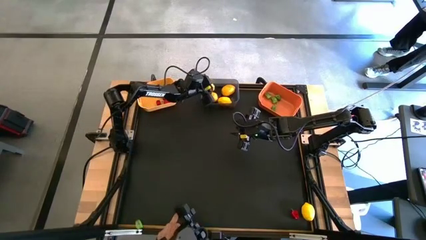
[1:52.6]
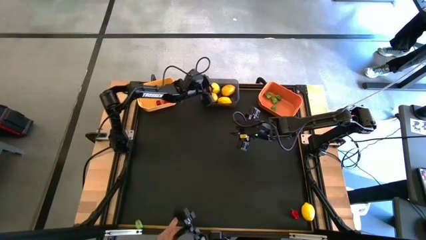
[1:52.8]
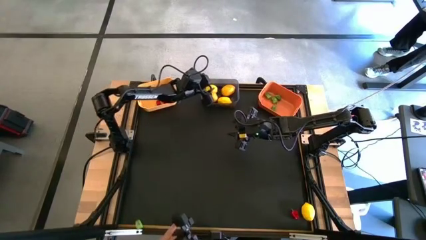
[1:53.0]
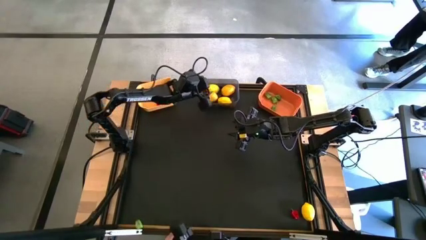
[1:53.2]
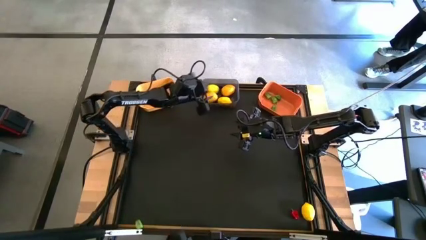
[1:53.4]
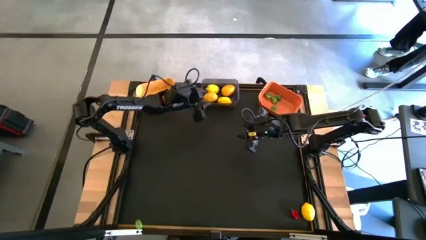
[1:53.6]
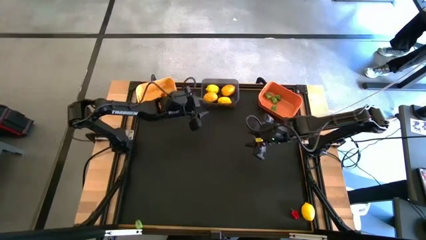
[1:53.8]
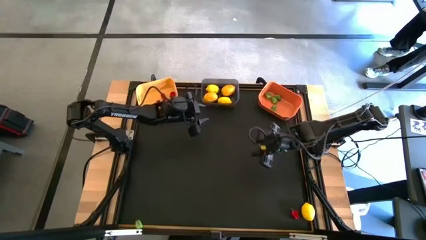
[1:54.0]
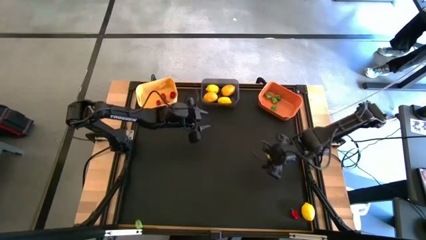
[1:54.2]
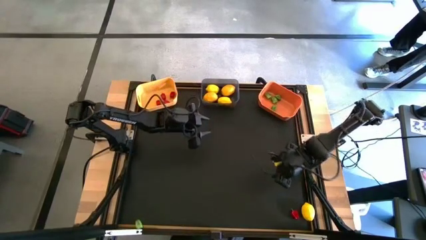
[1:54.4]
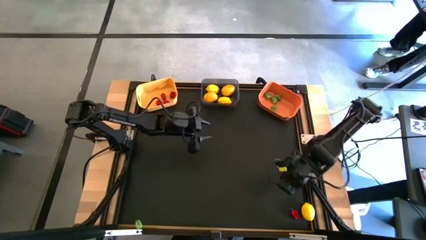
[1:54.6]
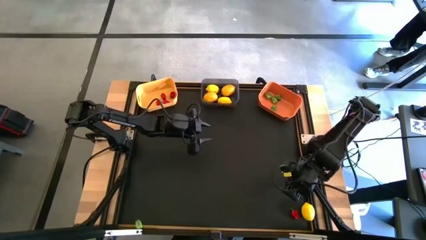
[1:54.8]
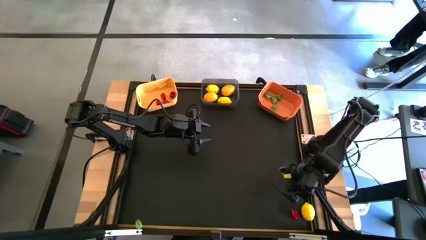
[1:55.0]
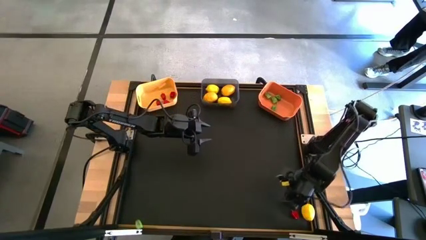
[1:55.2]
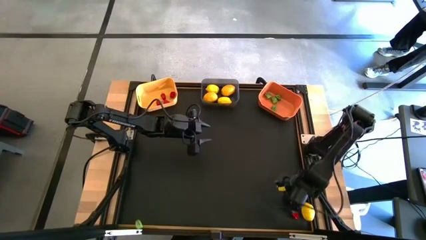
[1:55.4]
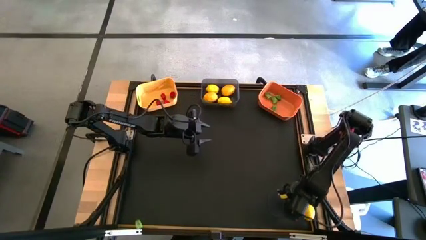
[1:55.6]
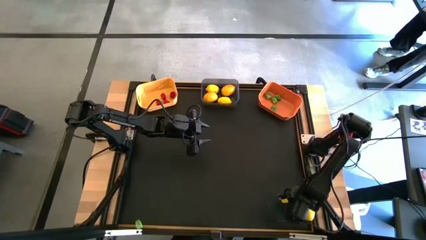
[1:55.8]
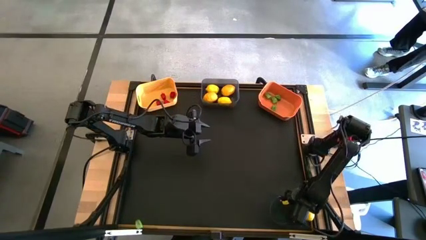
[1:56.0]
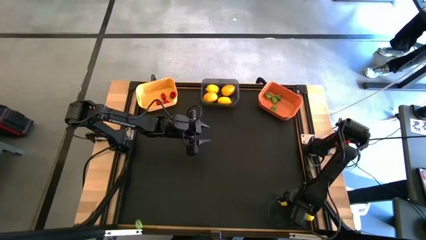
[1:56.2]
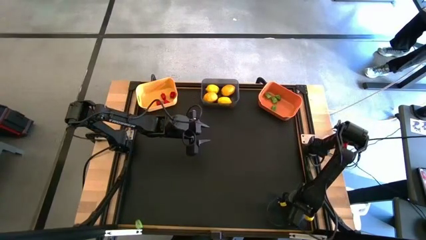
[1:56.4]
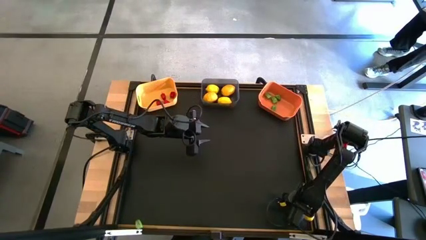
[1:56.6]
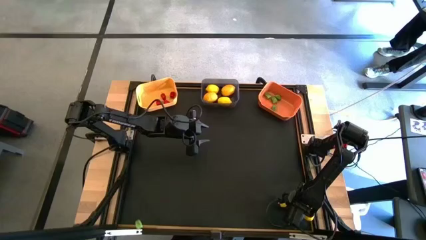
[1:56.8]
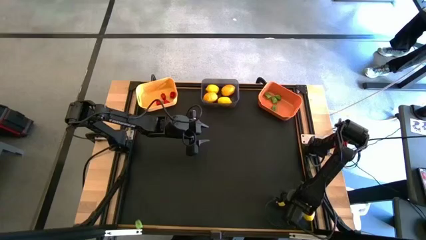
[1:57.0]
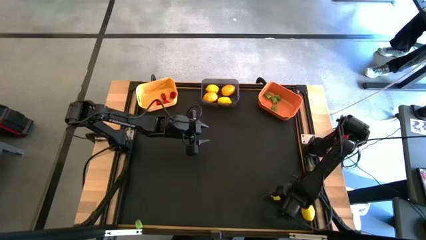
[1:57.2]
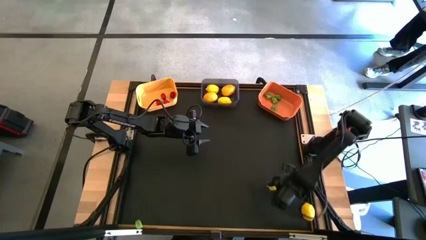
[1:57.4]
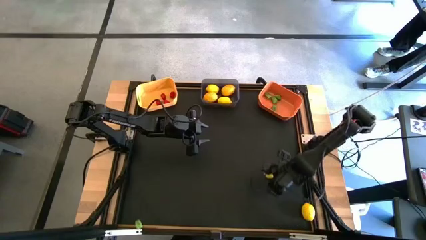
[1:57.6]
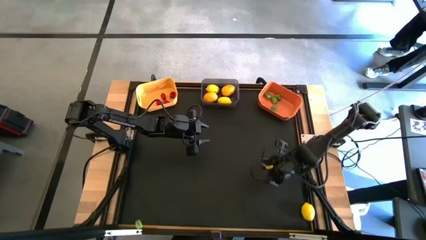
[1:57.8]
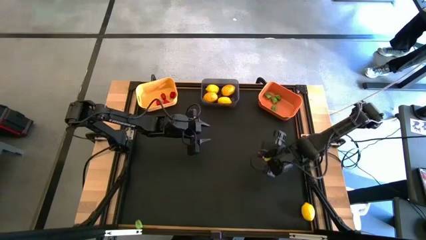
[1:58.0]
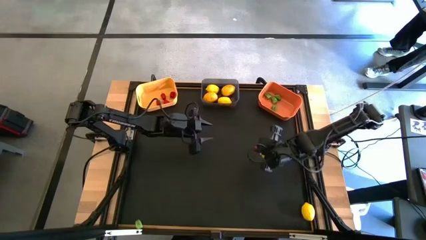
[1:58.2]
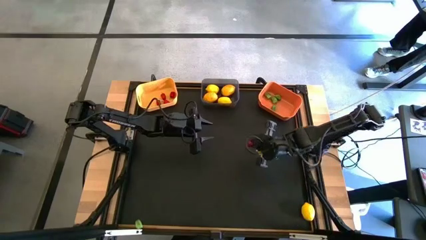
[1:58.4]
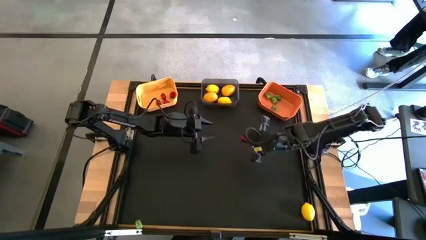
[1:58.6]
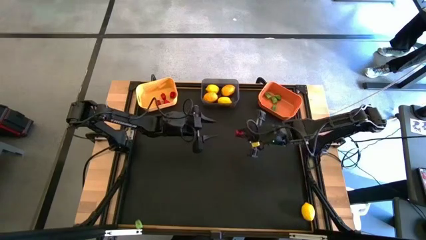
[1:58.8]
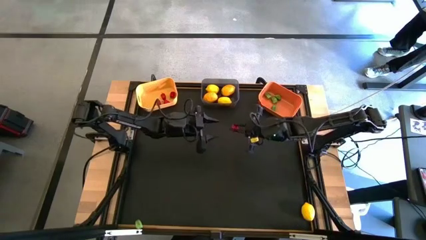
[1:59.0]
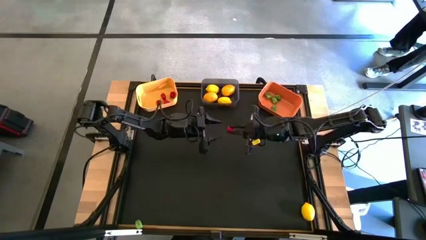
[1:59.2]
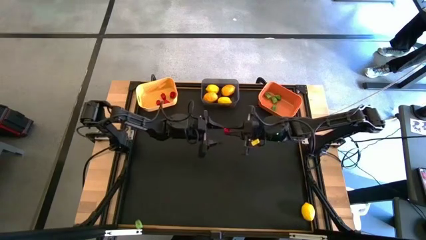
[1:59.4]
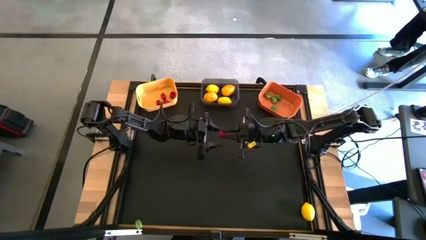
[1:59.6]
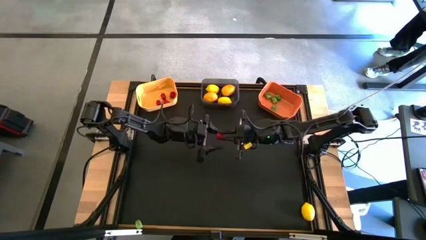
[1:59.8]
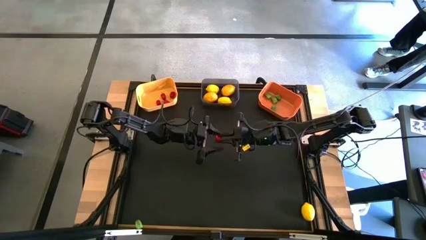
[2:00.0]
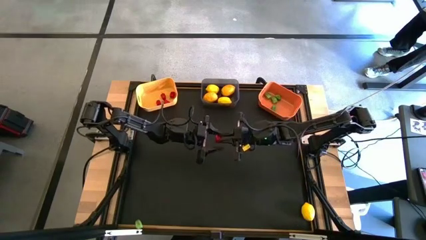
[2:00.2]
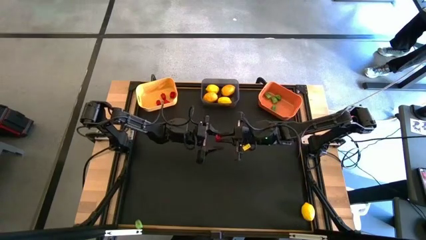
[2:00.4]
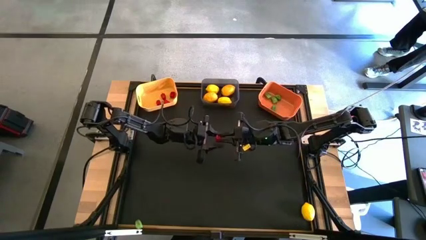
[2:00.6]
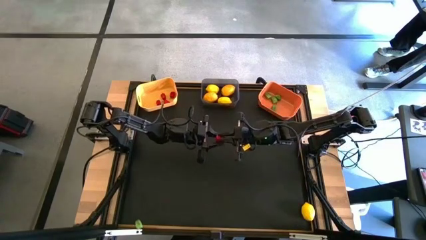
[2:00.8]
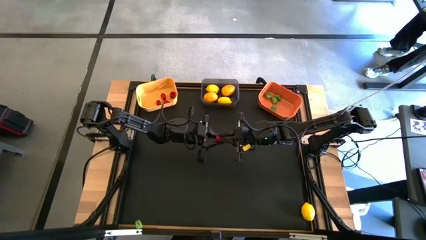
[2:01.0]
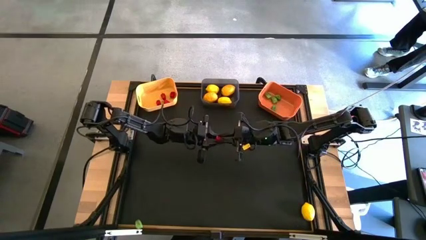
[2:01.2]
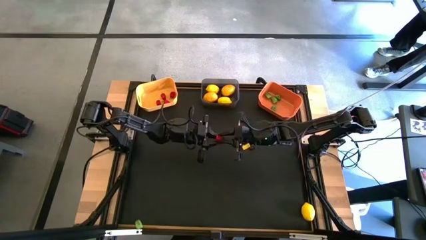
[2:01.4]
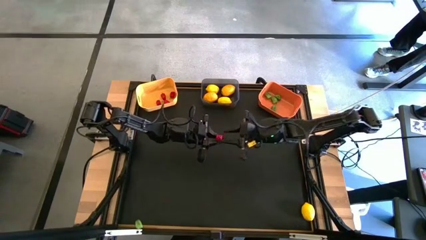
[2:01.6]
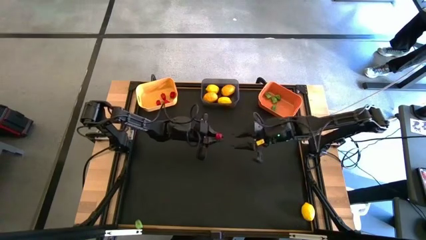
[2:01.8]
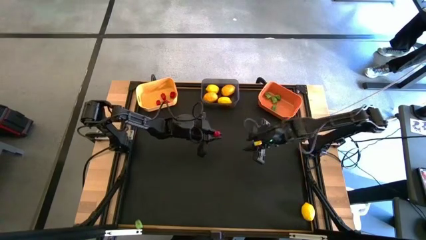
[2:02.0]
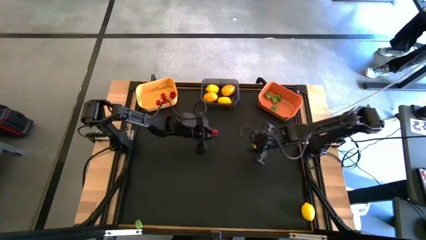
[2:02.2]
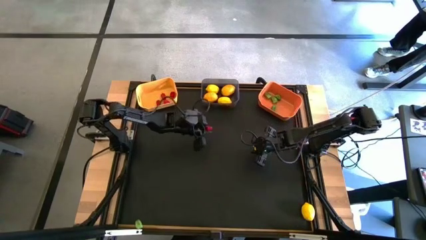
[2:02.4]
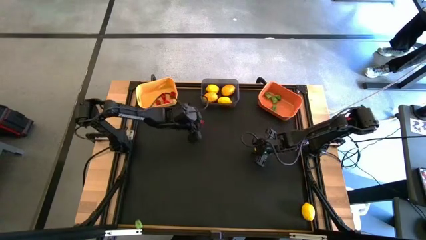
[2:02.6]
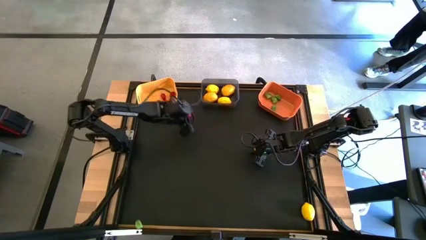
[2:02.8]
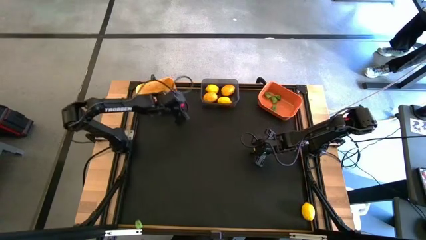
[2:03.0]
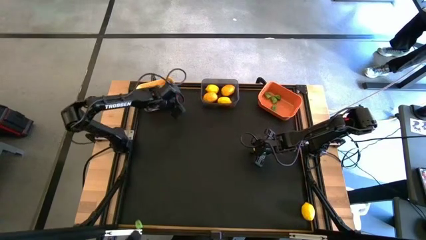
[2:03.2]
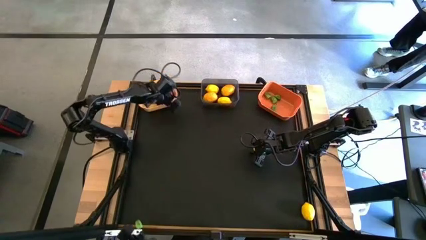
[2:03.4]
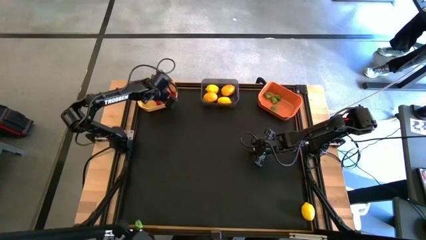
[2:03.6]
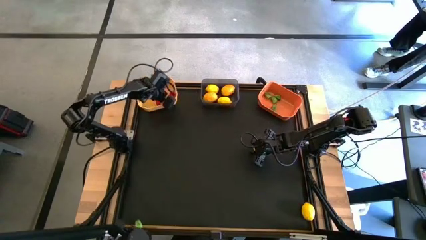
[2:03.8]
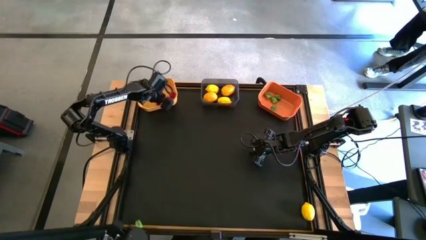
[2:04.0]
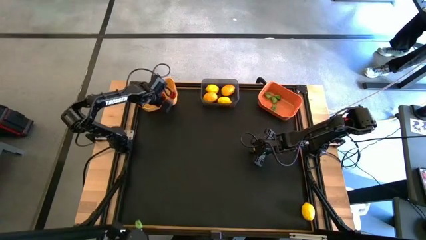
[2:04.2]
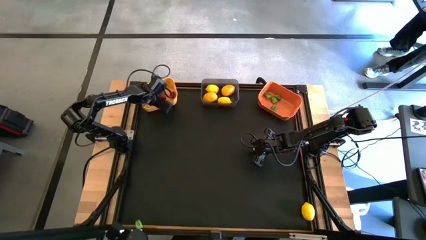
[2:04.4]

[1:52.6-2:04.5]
Task: Sort produce into baskets
Put the red chili pepper into the yellow bin

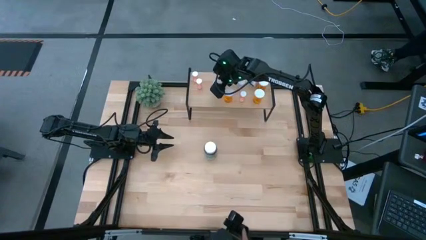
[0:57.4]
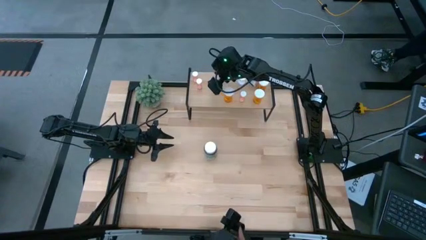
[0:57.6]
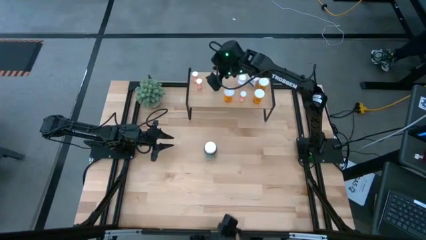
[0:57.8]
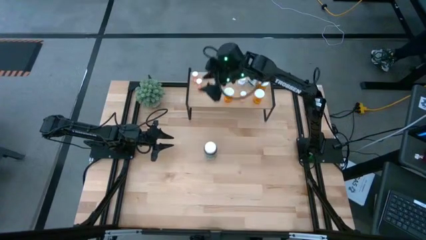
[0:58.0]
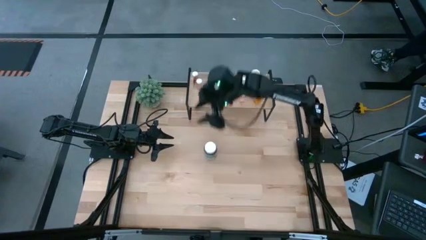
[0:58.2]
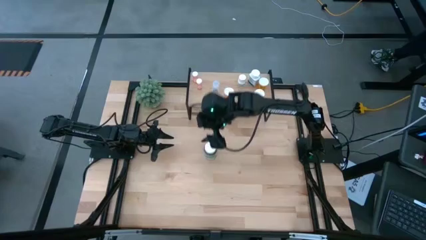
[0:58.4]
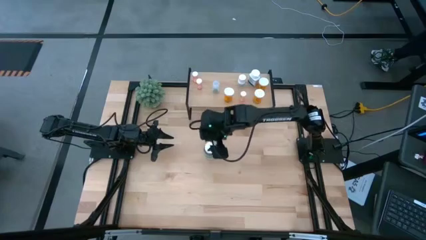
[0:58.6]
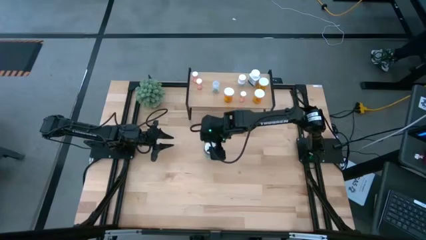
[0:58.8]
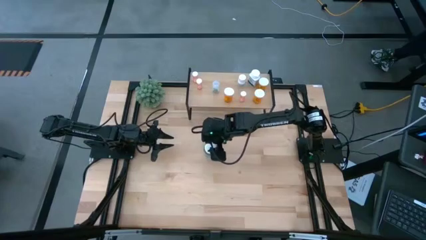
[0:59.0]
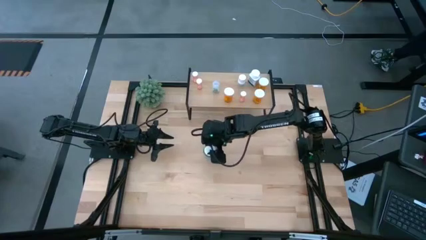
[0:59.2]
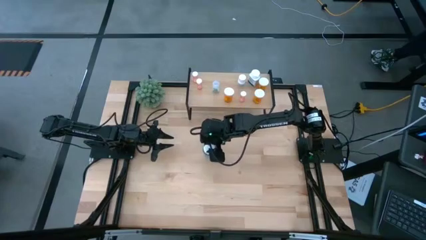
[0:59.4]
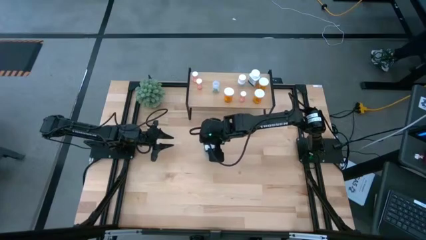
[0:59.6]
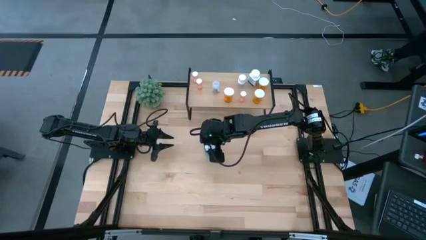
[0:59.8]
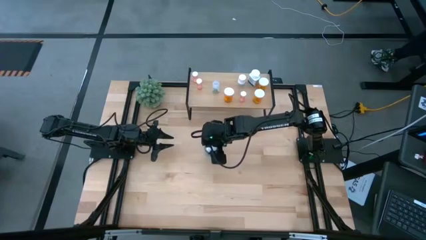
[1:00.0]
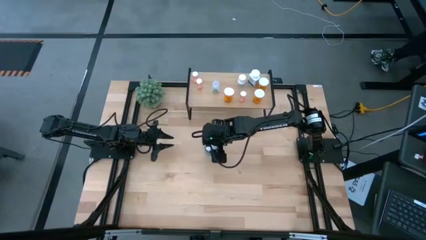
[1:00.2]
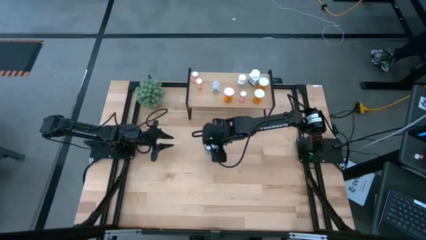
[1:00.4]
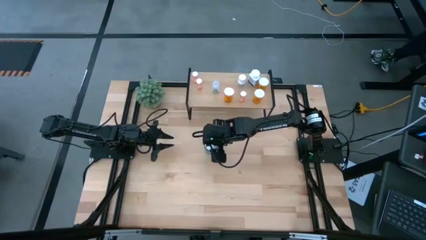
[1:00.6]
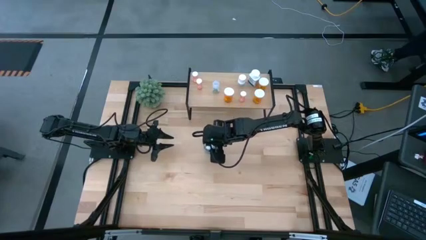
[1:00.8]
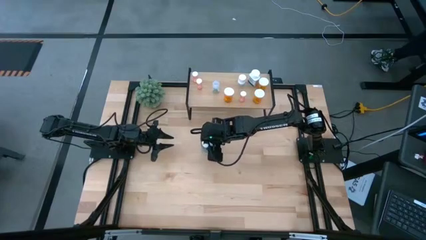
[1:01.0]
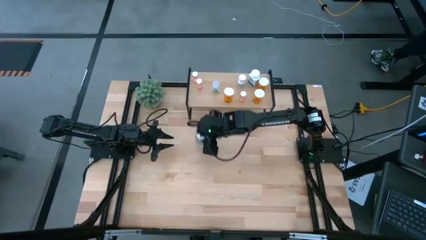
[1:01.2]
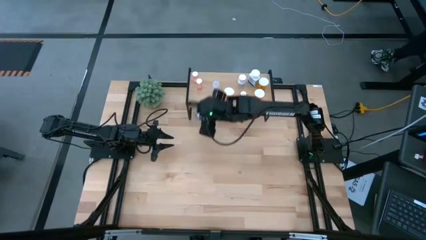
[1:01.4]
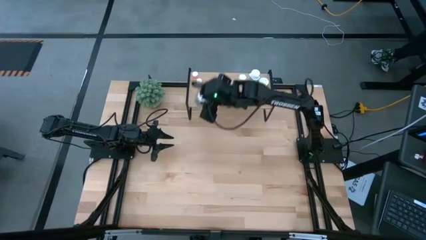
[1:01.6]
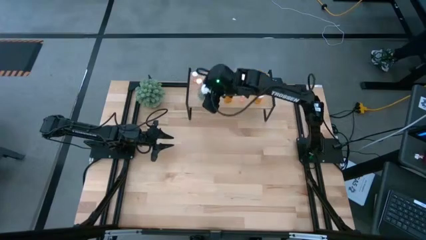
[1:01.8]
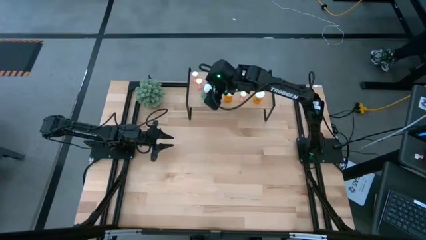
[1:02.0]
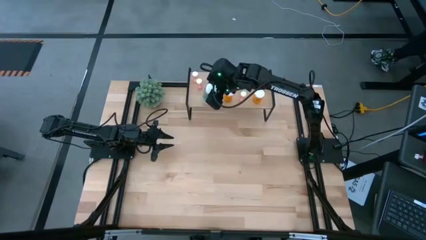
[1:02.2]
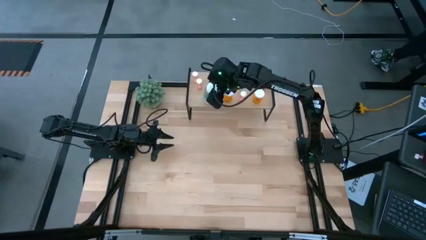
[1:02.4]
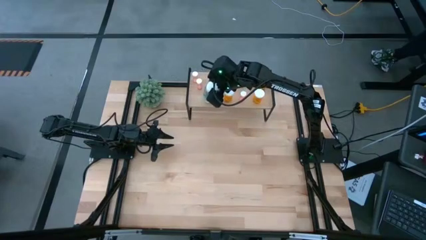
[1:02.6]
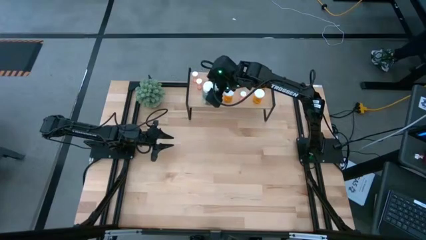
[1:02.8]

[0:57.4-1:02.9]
Task: Pick and place medicine bottles onto shelf by color
Put the green pill bottle on the shelf
